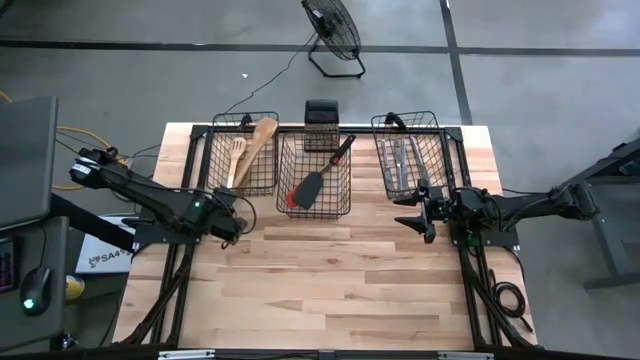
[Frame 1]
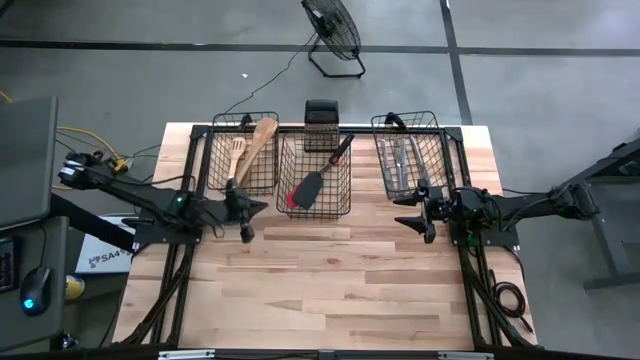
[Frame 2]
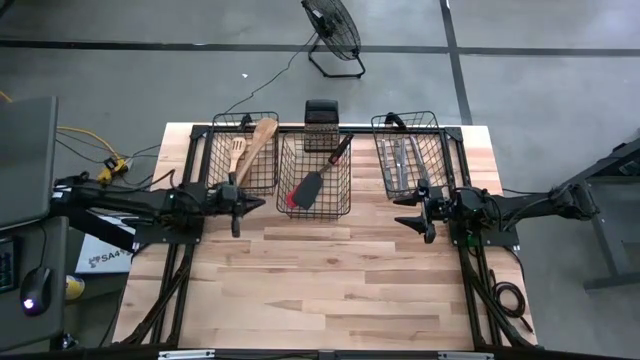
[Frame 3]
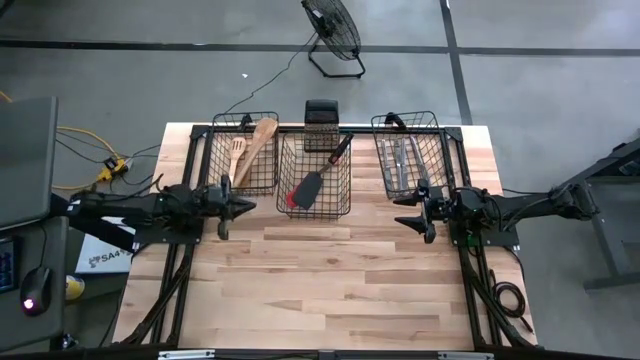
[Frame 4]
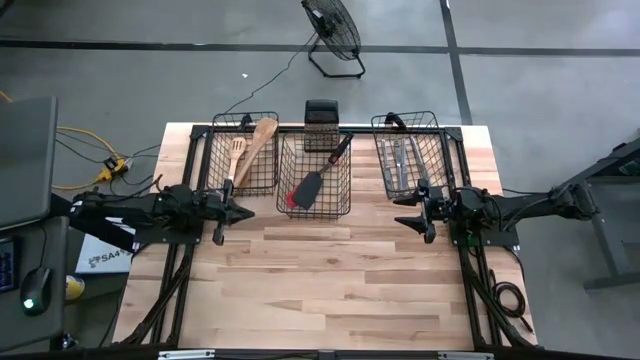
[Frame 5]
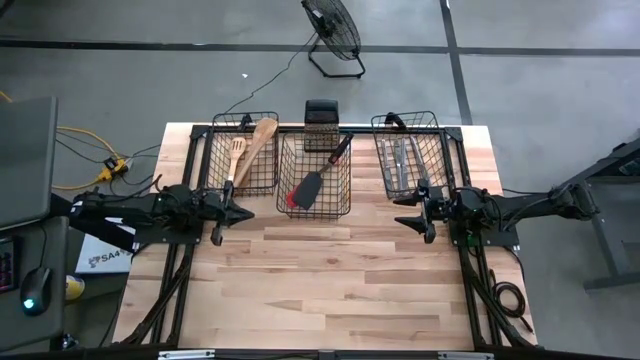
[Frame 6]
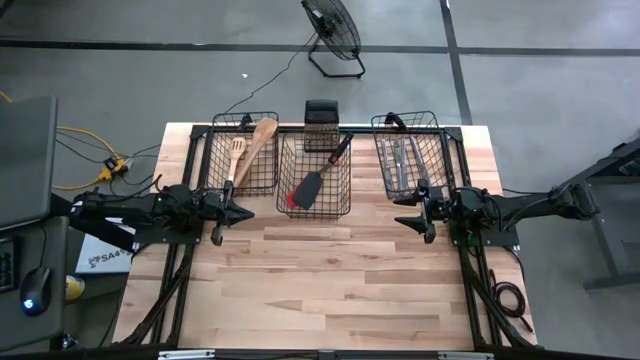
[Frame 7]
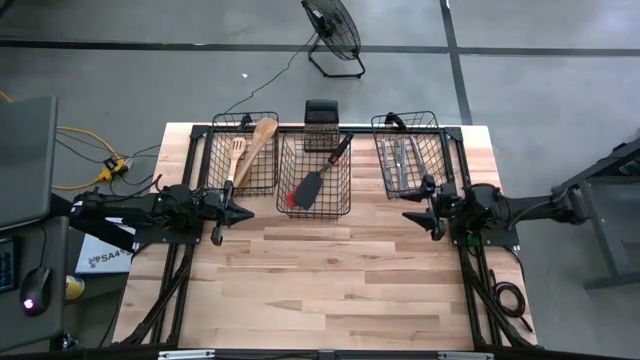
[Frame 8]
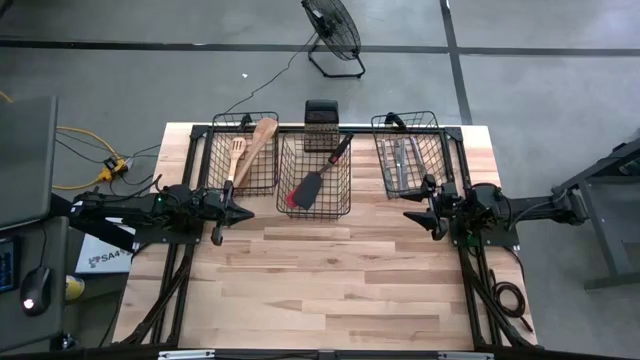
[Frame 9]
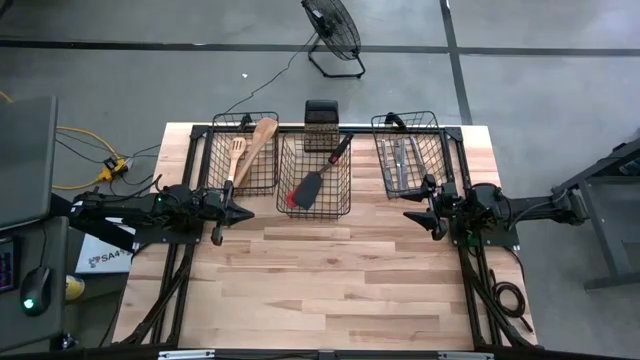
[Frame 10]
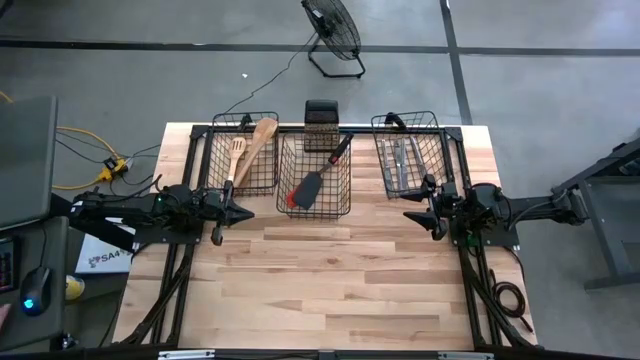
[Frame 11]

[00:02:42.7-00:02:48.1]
Task: Pick & Place Kitchen Items
Return to Home Position

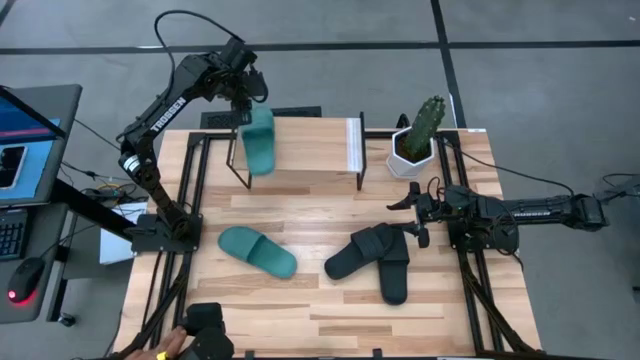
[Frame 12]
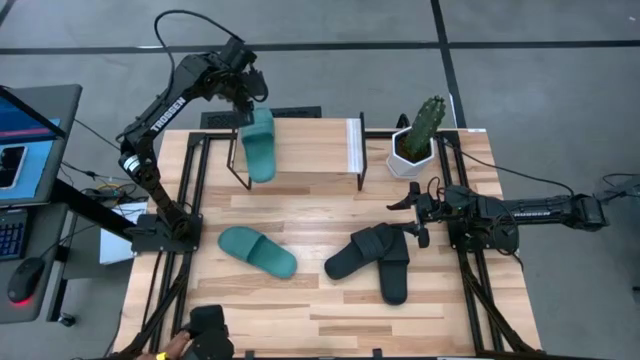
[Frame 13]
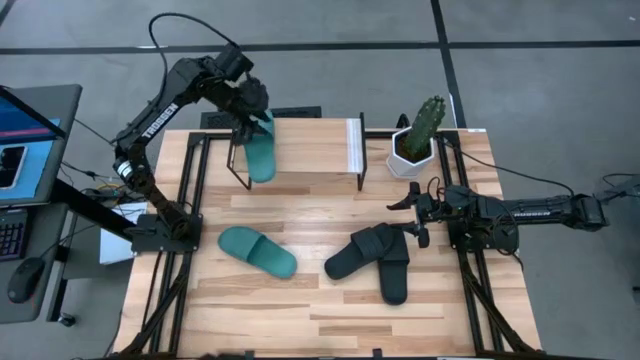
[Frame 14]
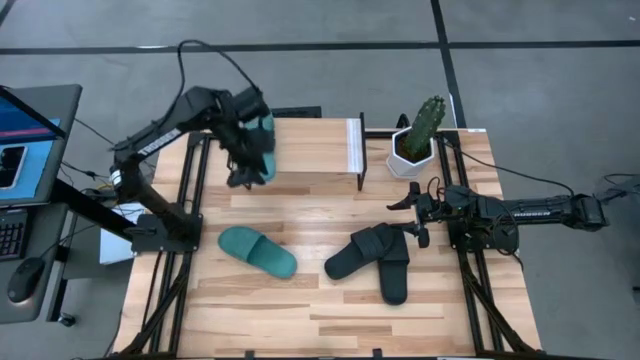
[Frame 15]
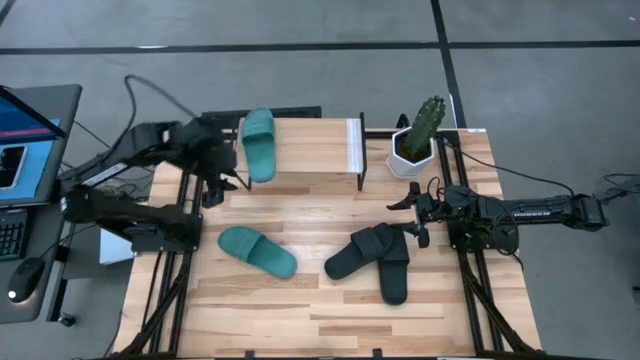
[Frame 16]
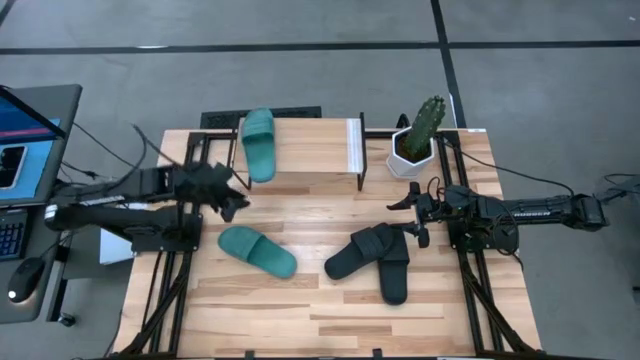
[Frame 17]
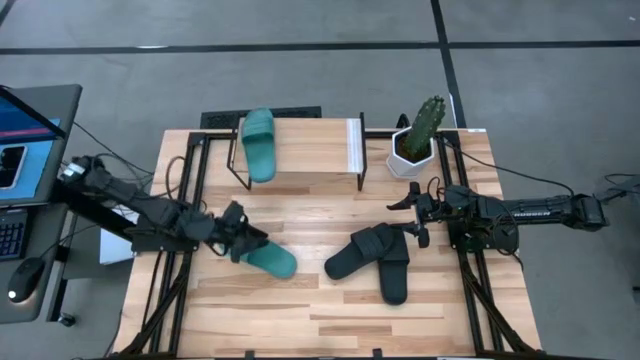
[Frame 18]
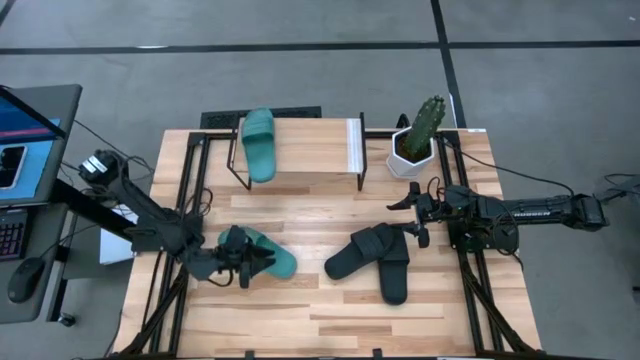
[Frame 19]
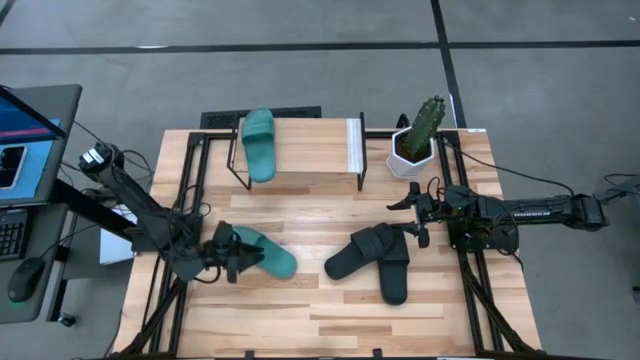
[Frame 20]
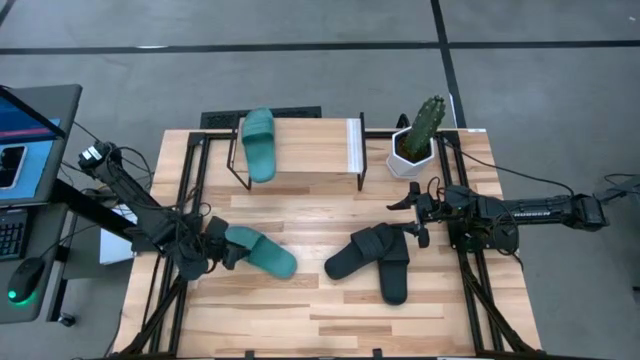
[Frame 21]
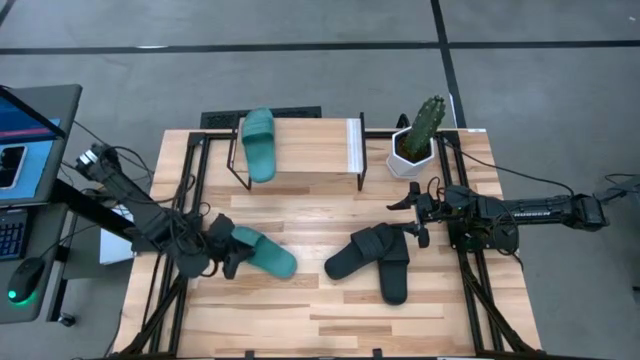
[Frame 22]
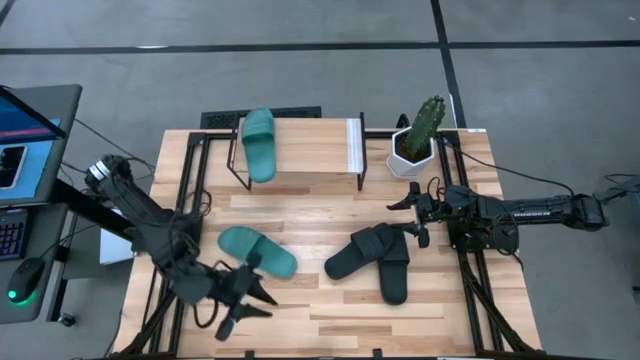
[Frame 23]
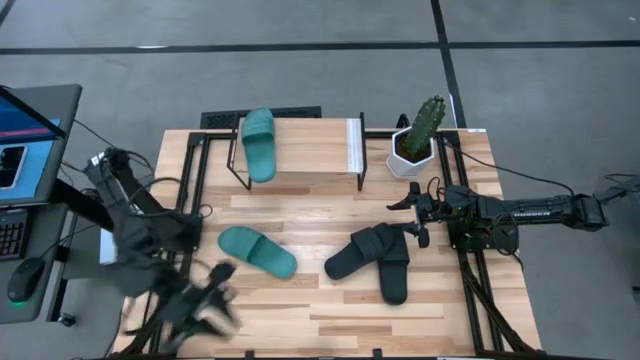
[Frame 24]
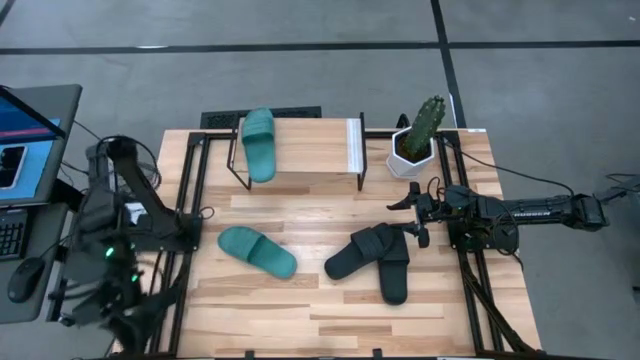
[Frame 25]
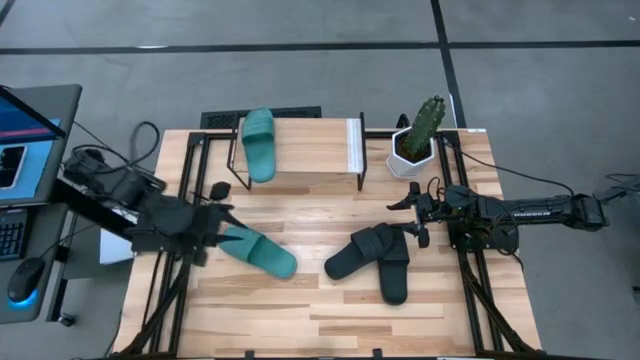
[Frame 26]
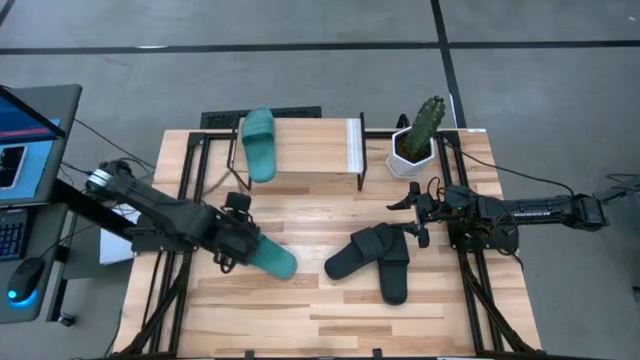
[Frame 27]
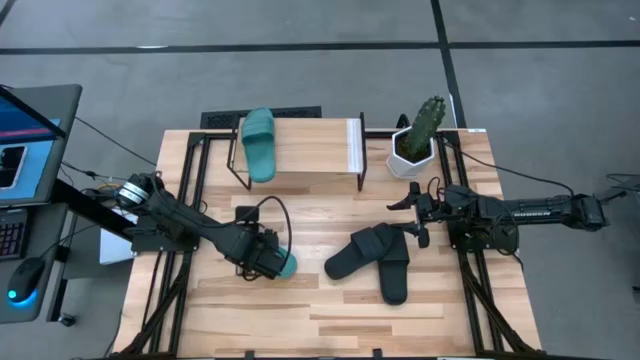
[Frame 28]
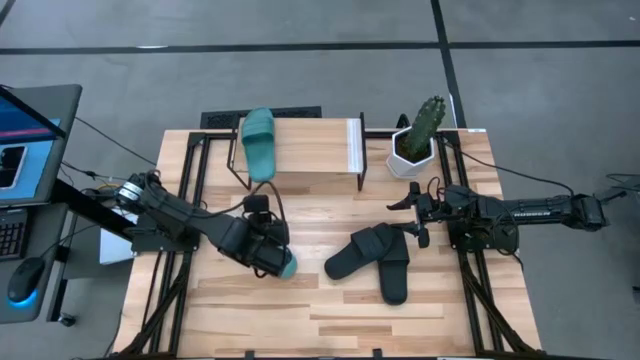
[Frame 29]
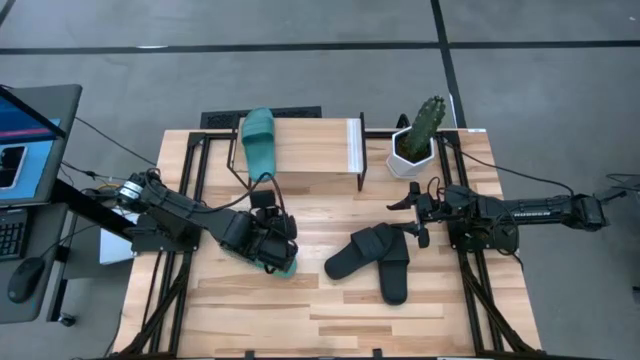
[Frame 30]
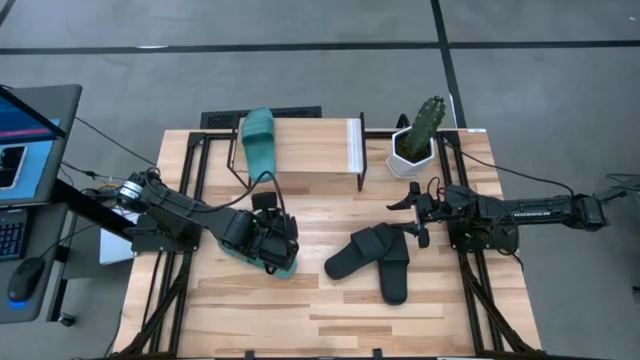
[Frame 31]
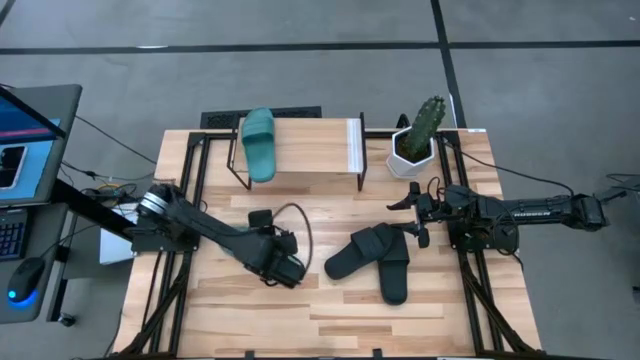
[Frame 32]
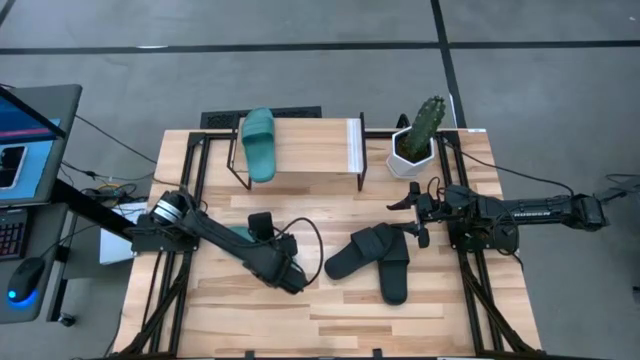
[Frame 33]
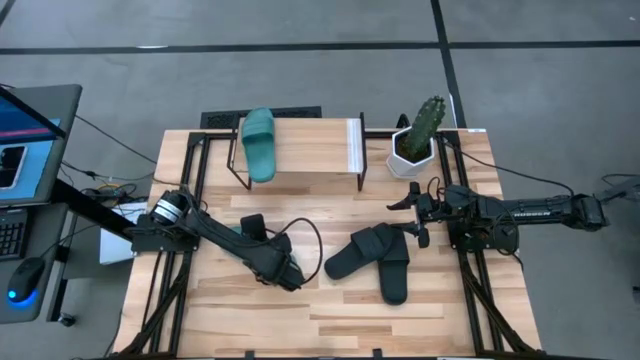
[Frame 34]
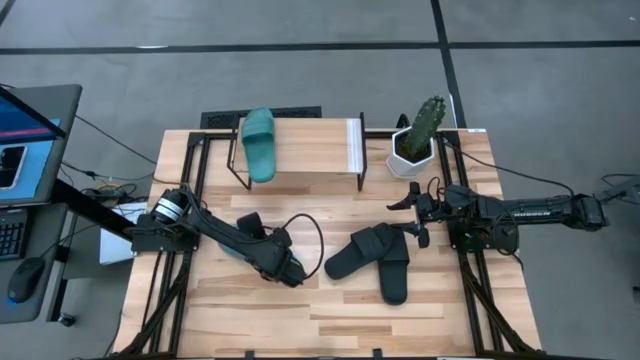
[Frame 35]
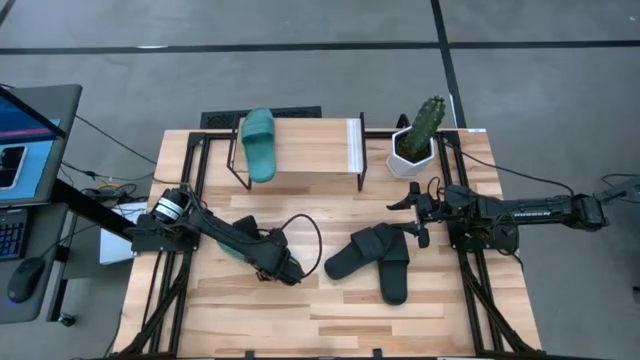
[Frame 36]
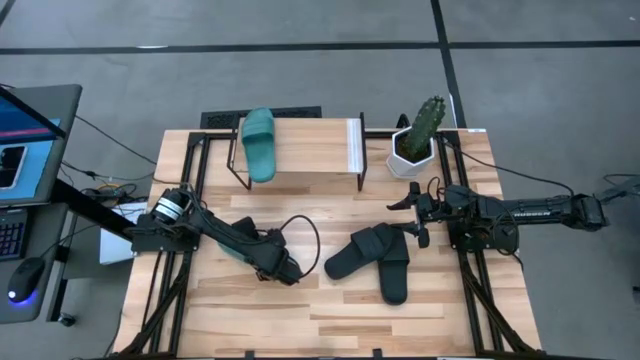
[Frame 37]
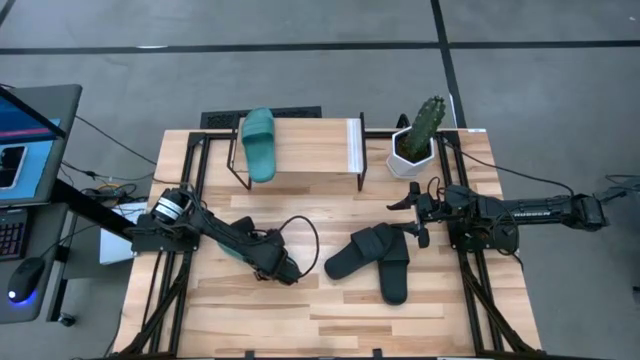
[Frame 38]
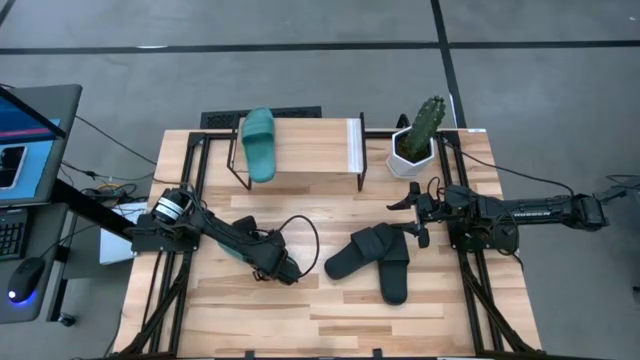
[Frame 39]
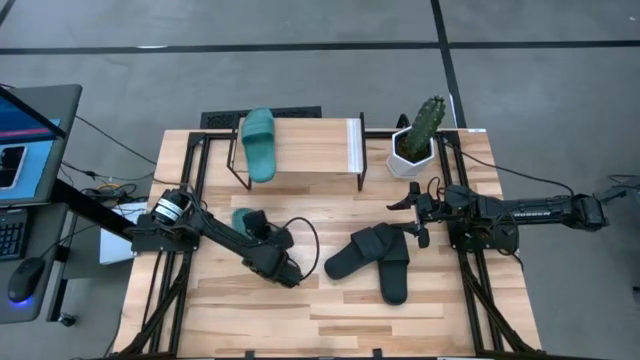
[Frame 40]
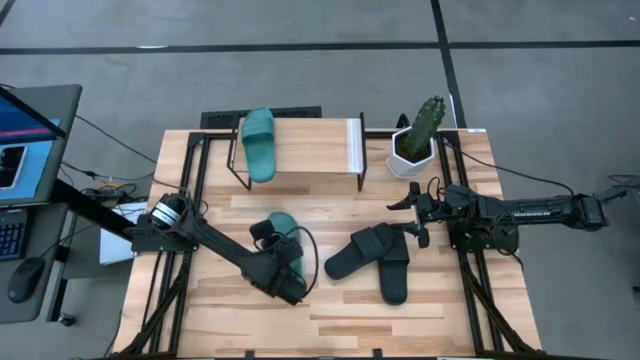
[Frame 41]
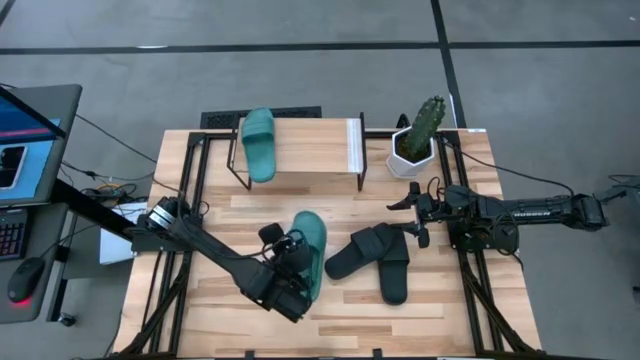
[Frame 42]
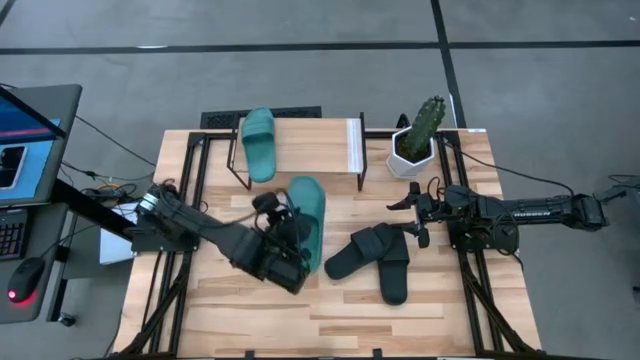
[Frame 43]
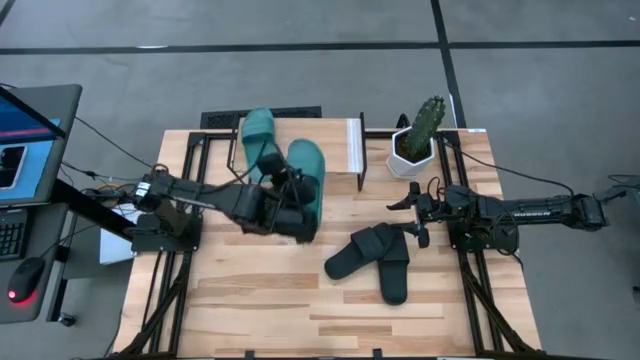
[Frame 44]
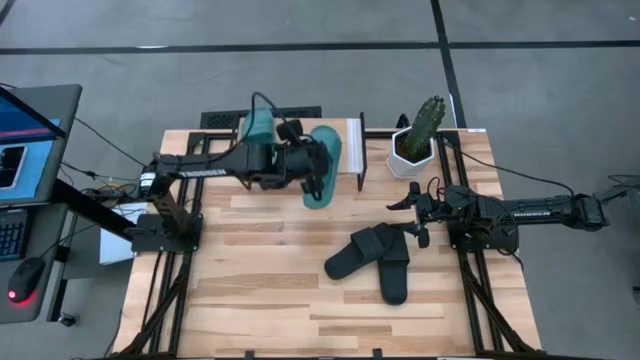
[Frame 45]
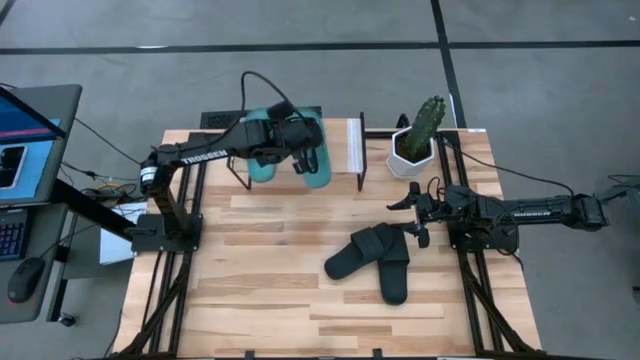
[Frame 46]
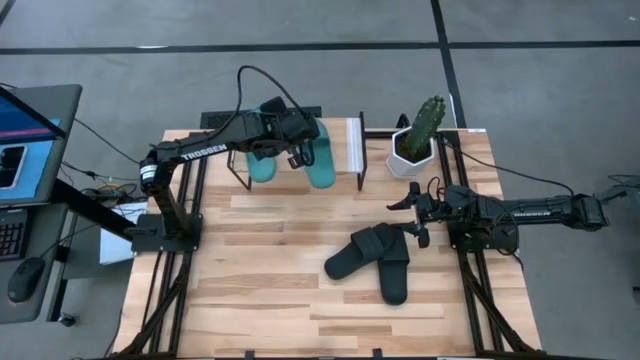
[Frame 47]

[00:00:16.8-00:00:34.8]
Task: Pick and place slides into the shelf
Put the light blue slide on the shelf
